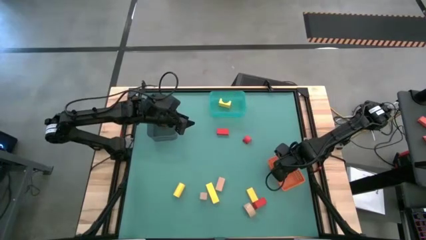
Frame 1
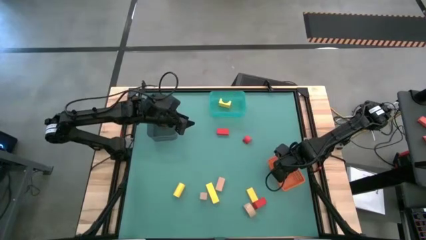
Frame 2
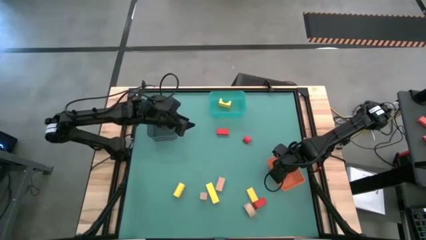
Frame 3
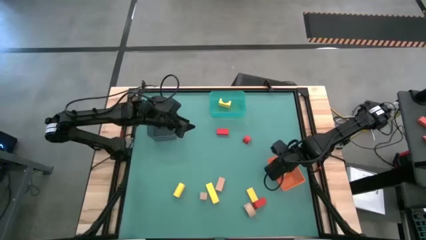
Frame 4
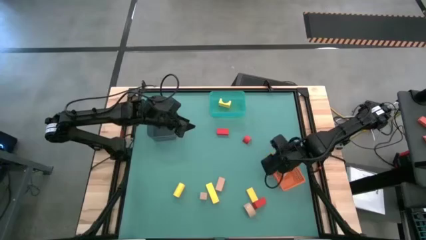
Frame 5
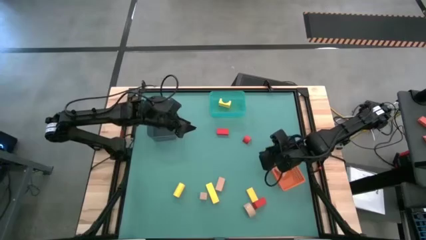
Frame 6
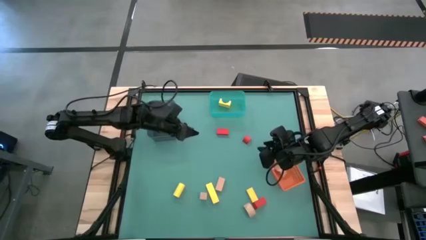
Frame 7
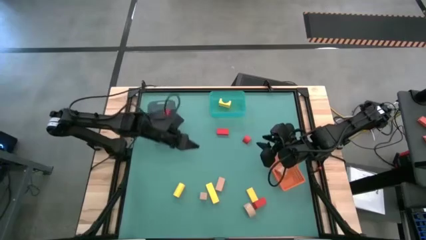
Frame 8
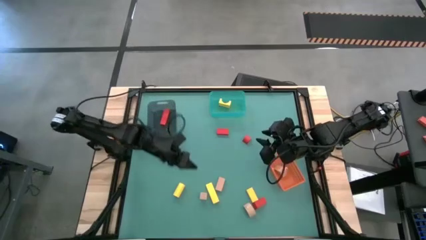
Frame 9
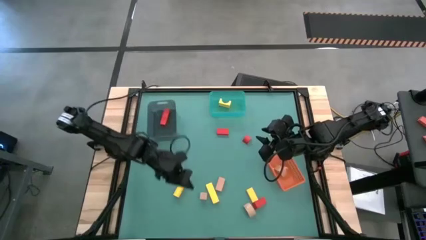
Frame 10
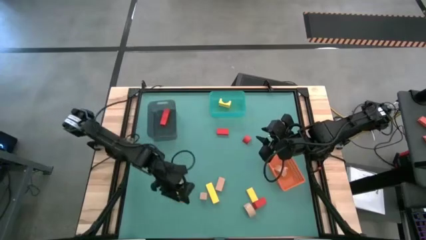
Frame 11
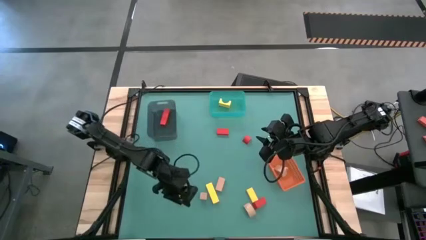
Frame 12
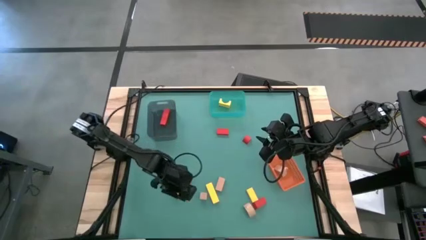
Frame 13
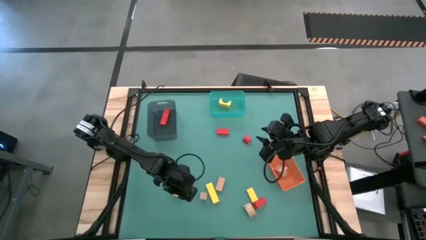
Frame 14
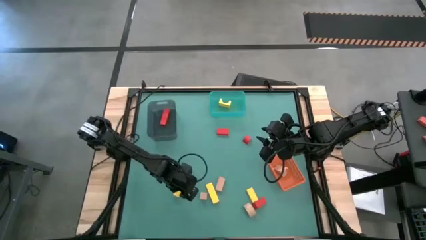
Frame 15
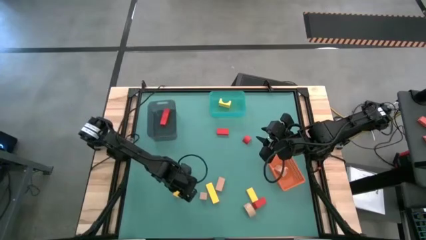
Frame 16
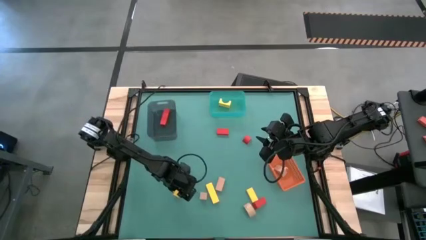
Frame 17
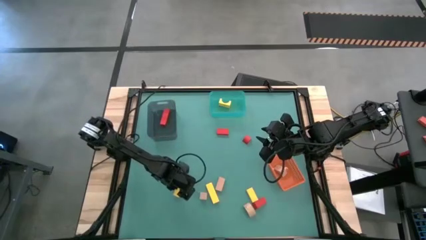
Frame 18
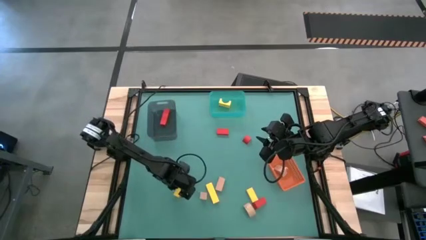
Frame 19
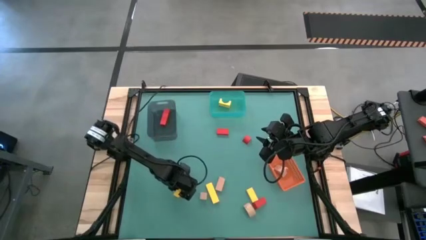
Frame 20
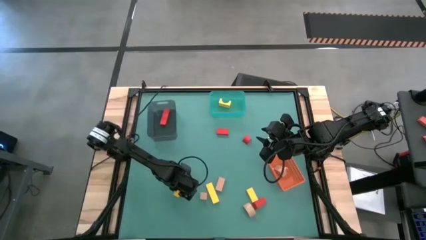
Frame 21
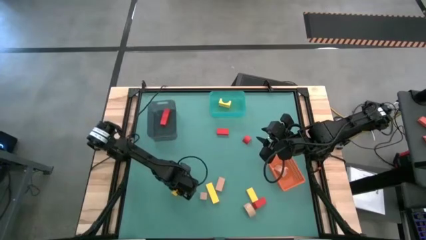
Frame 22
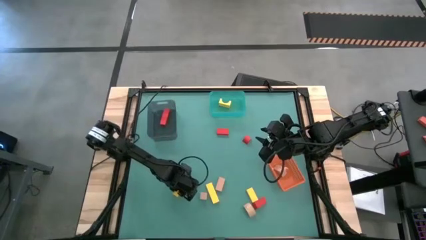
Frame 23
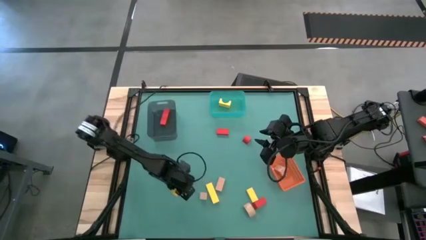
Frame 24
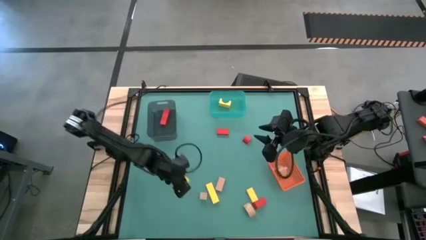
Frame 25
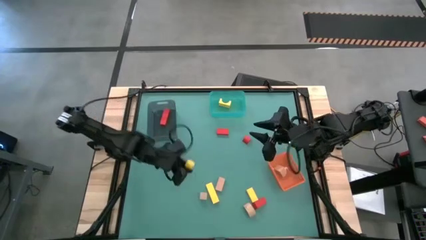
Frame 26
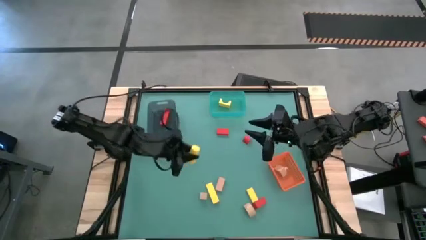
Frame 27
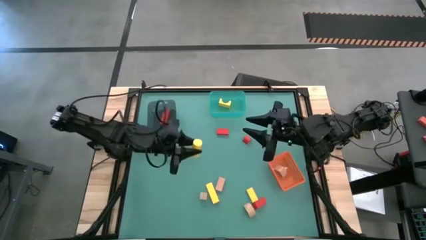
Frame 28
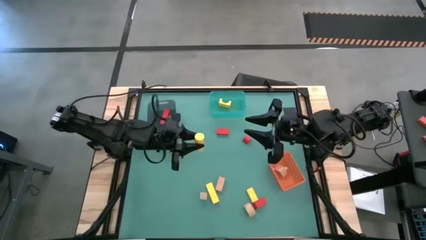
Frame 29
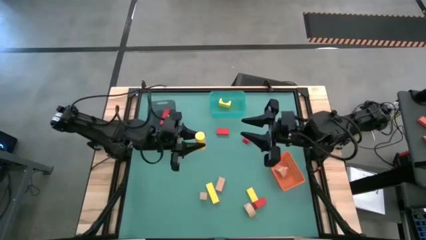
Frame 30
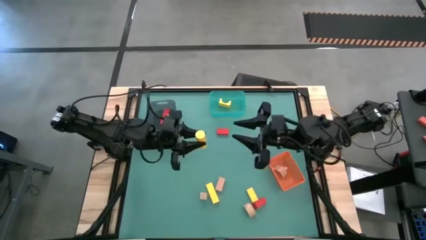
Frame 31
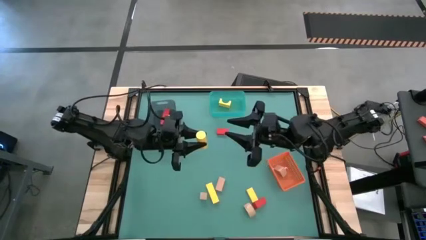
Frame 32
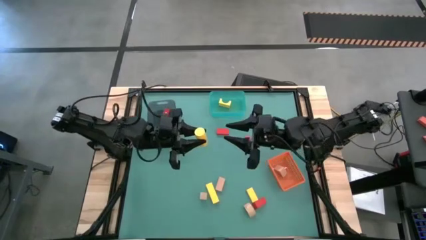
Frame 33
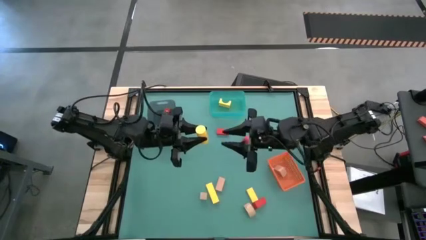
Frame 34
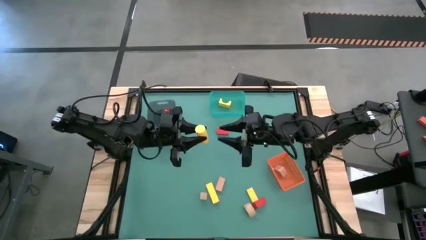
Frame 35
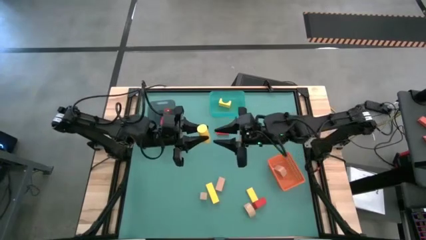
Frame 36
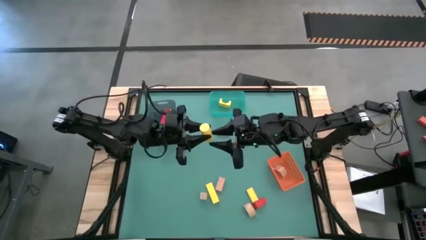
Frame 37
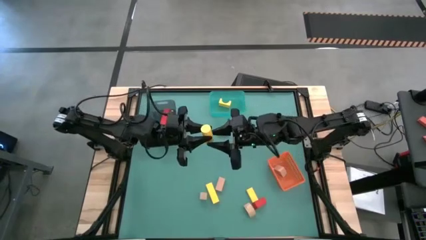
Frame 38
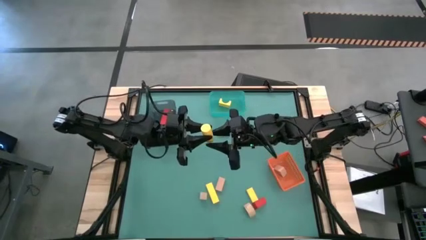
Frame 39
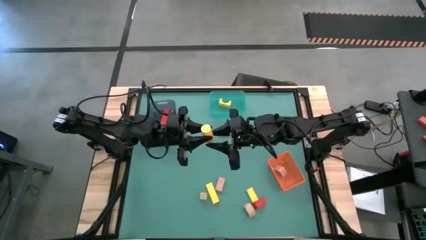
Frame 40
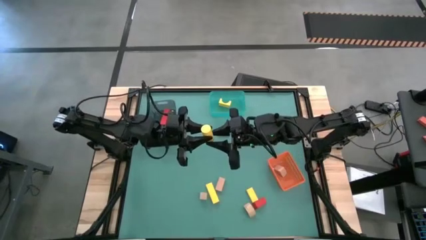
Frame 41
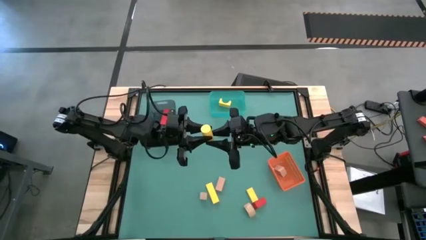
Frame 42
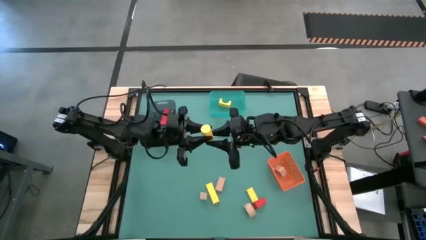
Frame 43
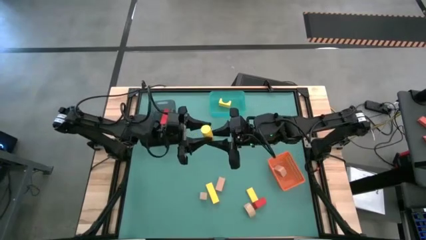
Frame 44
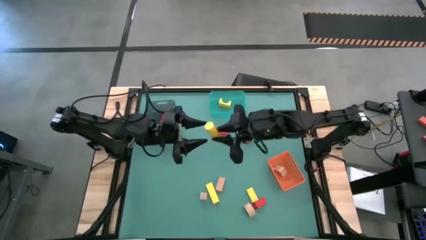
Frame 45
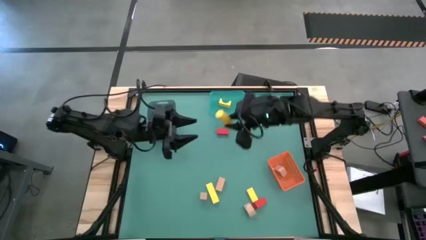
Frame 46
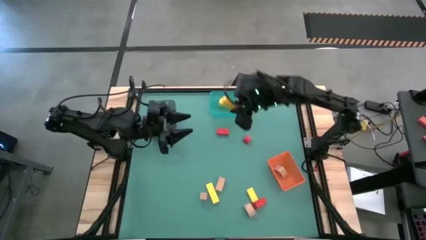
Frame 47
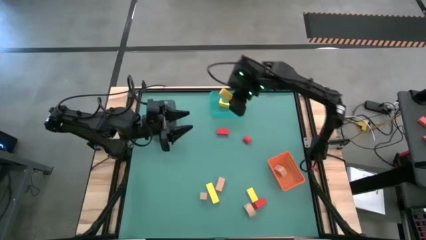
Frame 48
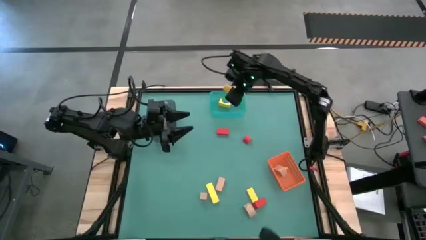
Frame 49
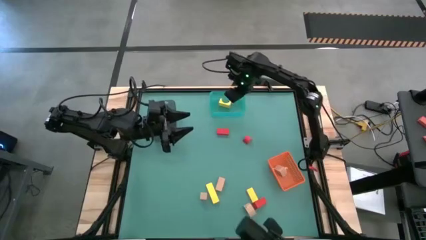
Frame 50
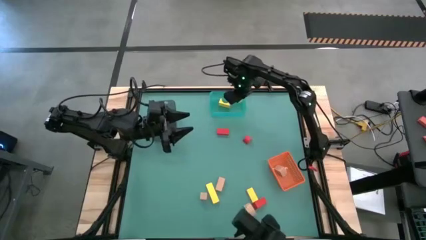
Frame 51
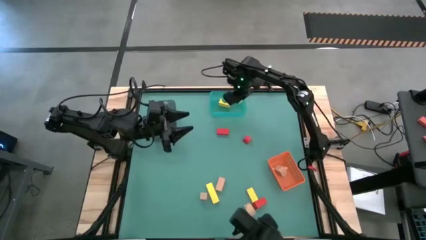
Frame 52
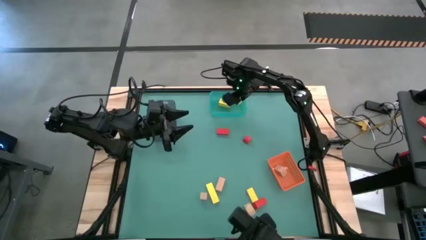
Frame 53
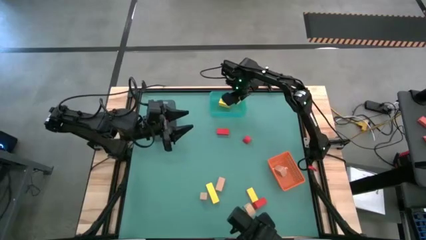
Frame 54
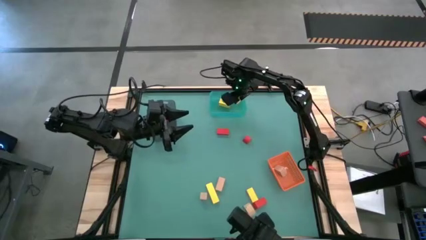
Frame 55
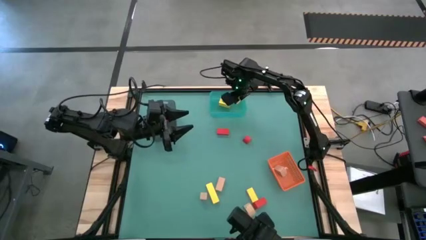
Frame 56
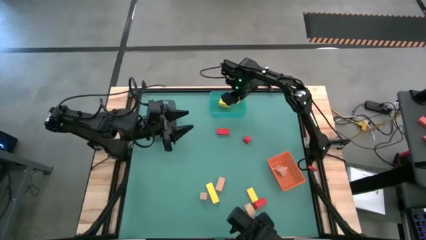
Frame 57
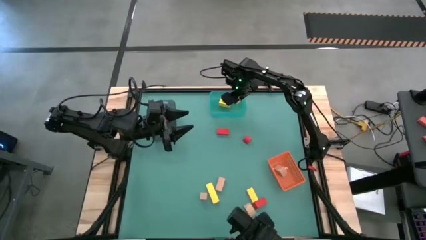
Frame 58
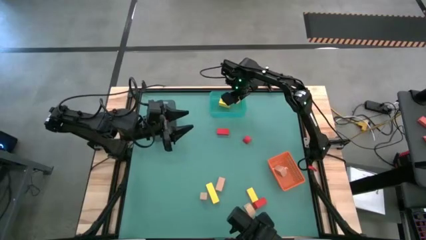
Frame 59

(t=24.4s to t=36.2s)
Task: Sort & place blocks by color
Put the yellow block into the green bin
